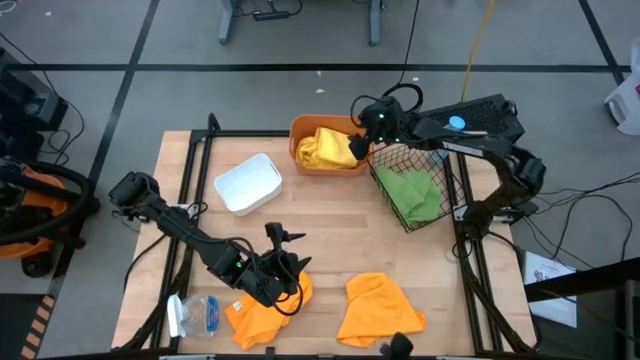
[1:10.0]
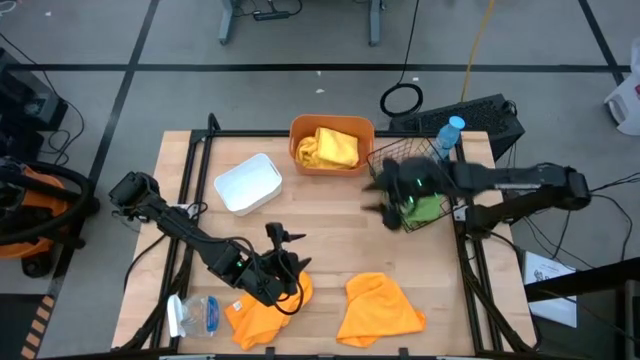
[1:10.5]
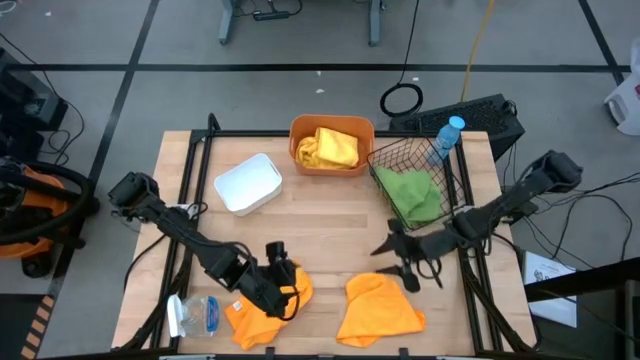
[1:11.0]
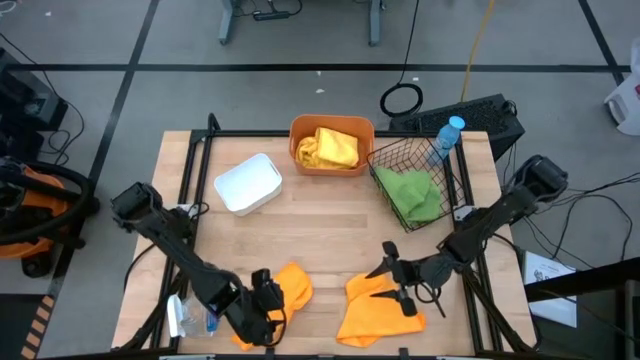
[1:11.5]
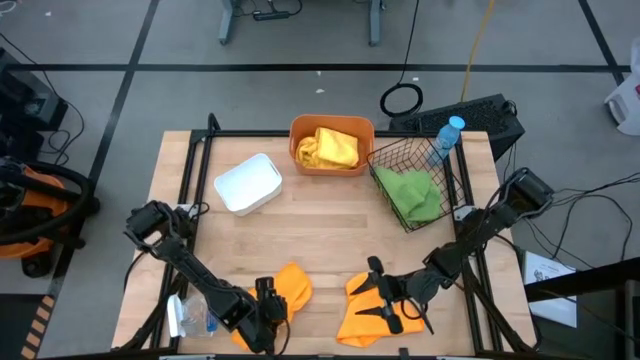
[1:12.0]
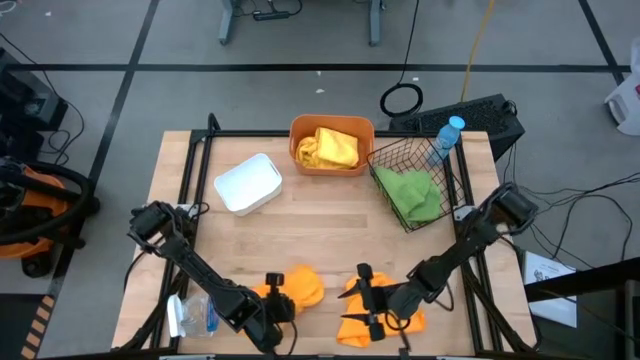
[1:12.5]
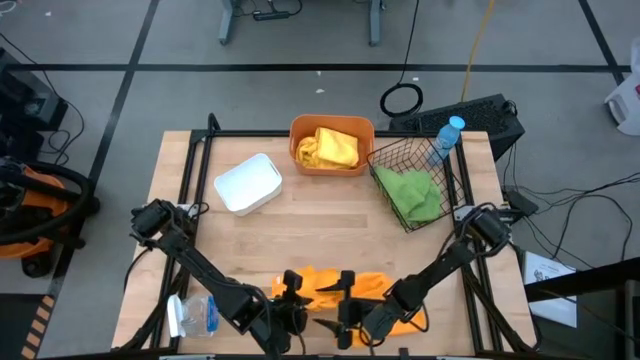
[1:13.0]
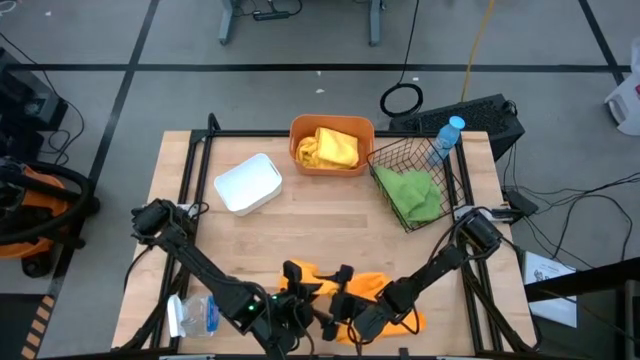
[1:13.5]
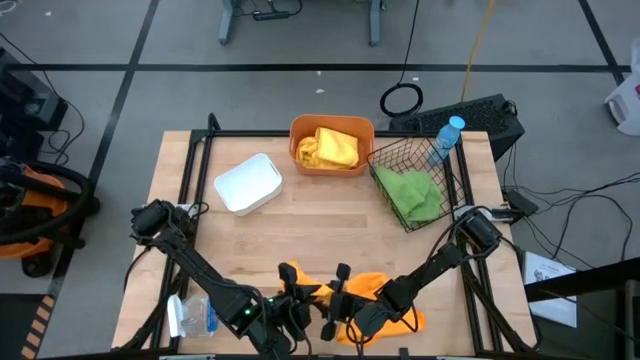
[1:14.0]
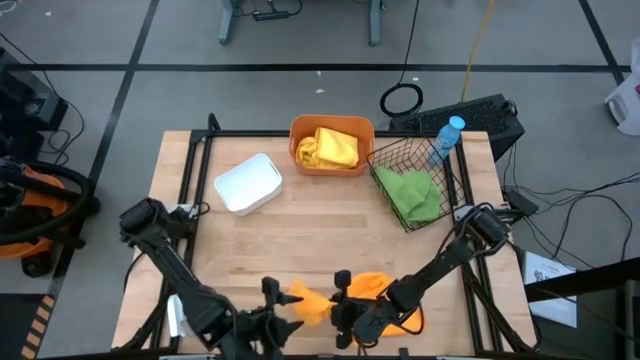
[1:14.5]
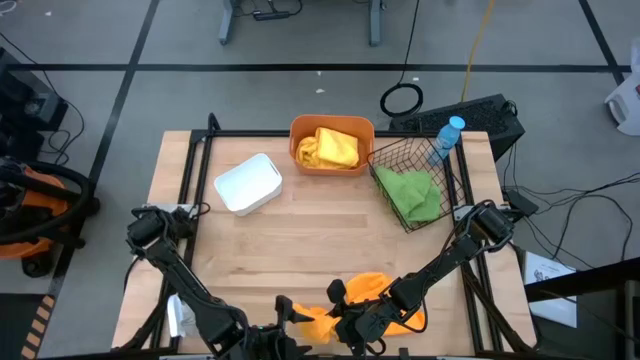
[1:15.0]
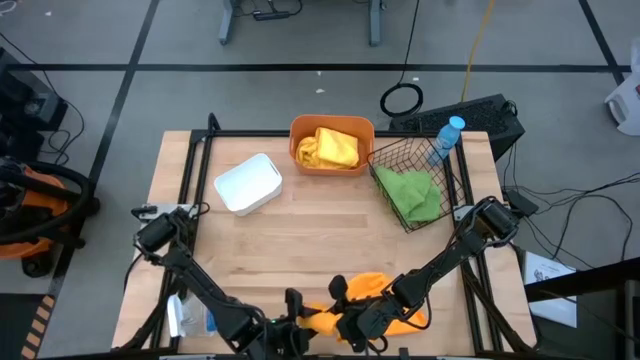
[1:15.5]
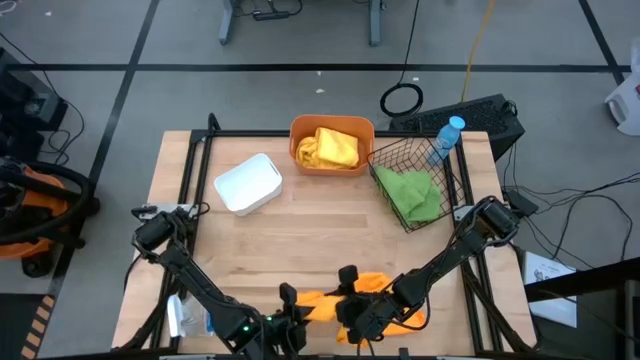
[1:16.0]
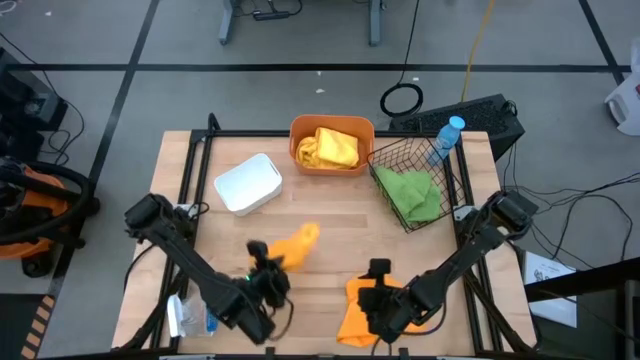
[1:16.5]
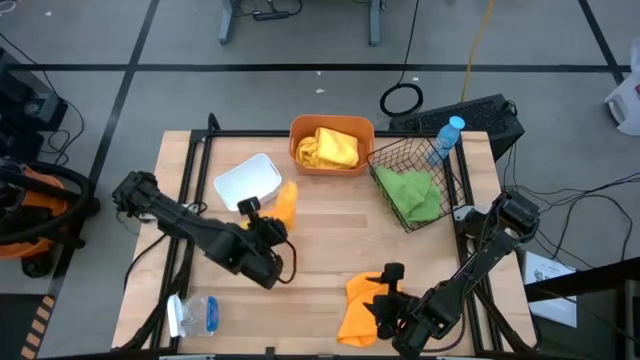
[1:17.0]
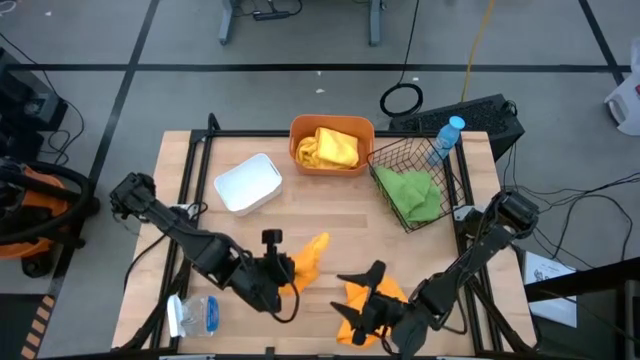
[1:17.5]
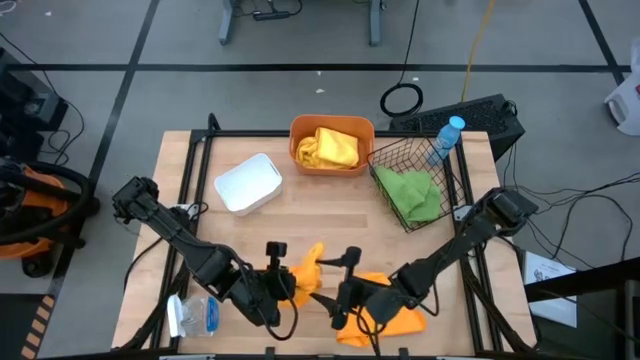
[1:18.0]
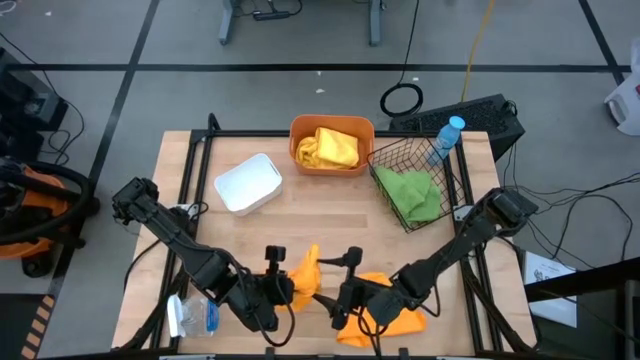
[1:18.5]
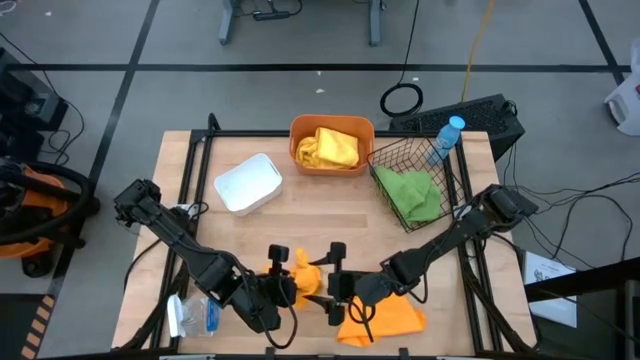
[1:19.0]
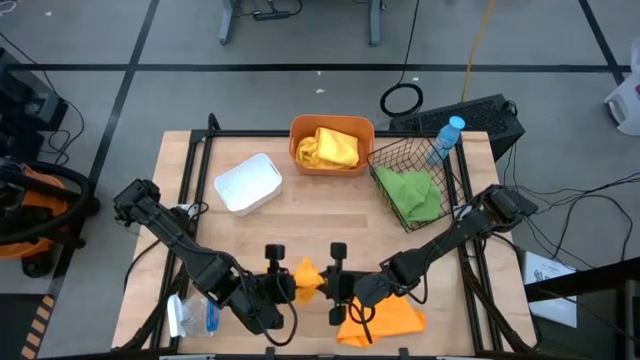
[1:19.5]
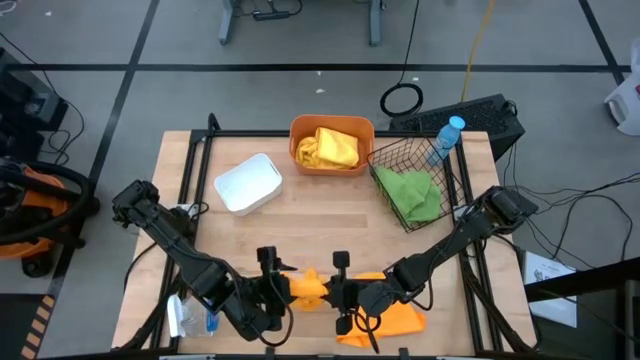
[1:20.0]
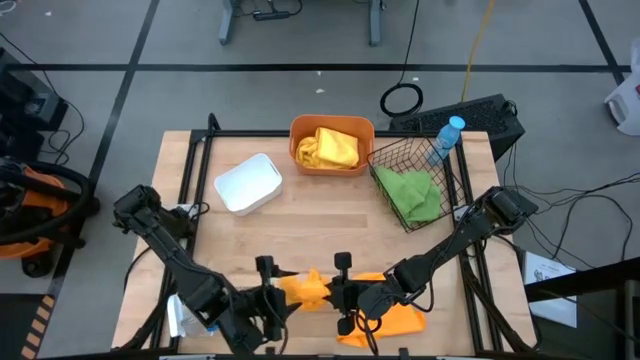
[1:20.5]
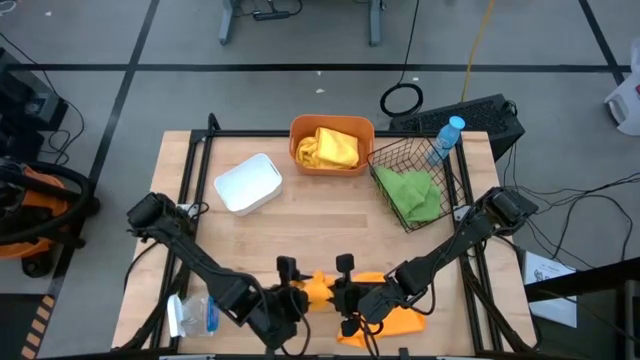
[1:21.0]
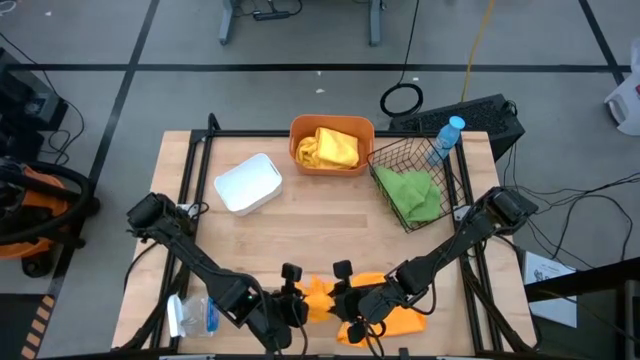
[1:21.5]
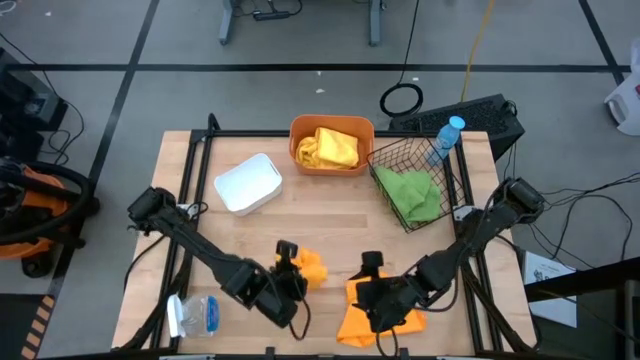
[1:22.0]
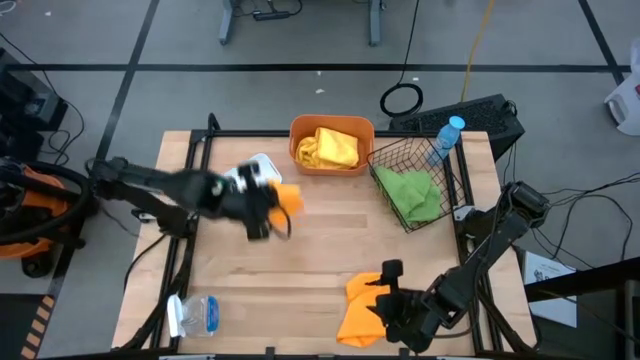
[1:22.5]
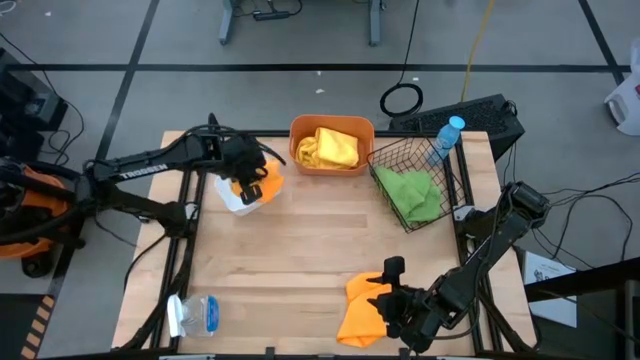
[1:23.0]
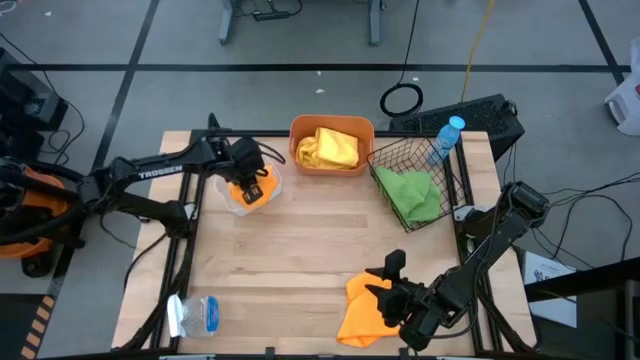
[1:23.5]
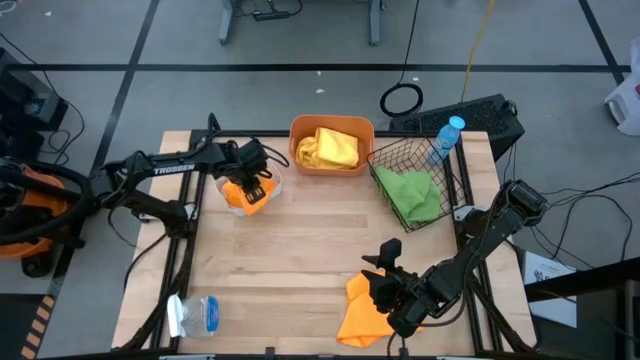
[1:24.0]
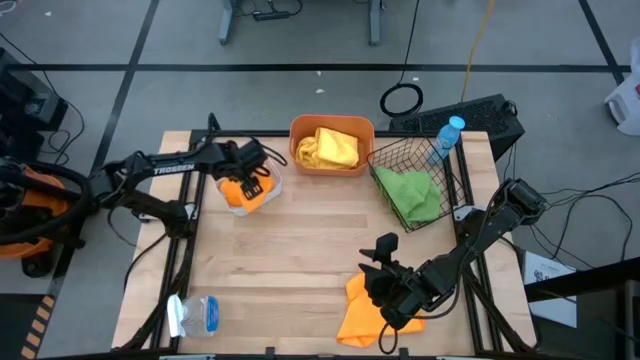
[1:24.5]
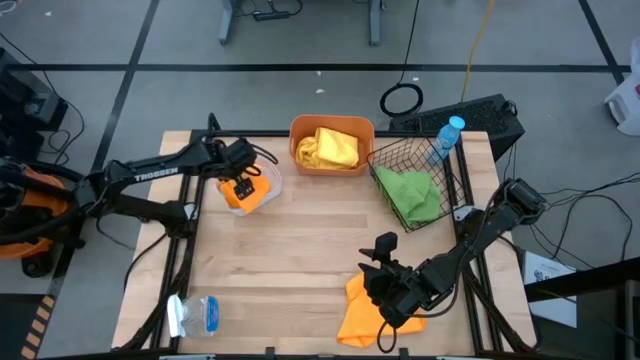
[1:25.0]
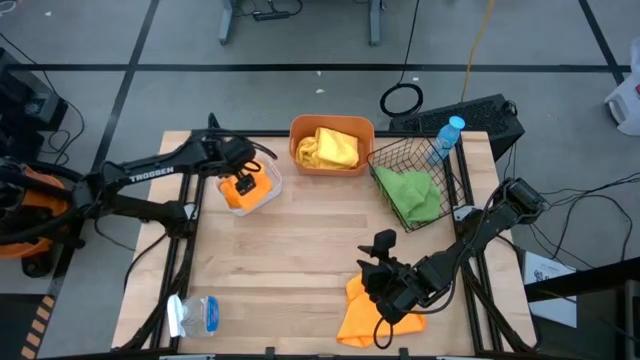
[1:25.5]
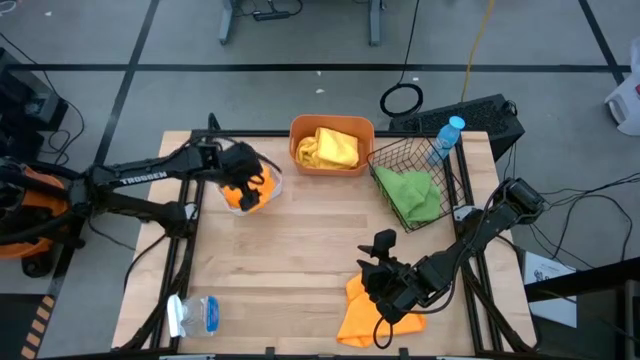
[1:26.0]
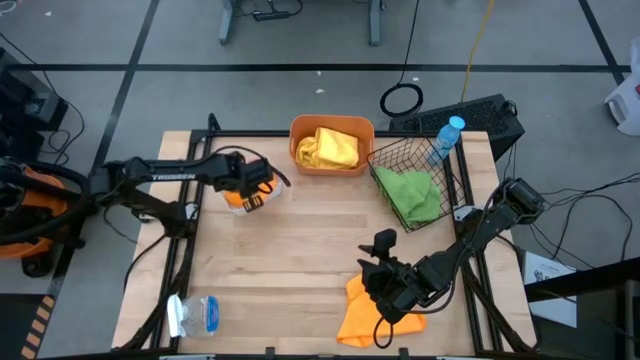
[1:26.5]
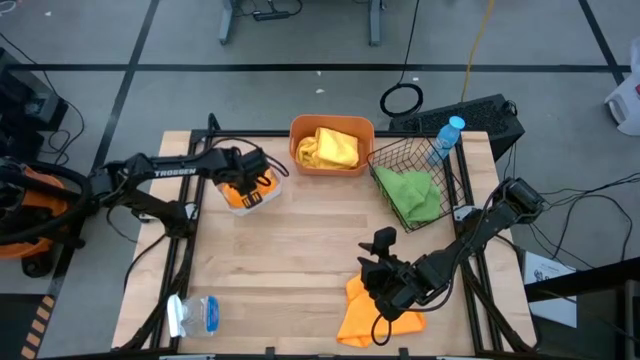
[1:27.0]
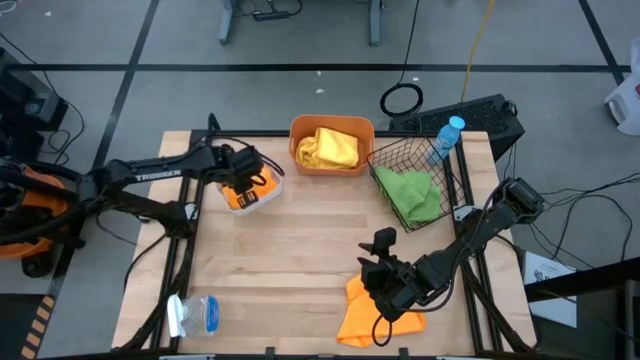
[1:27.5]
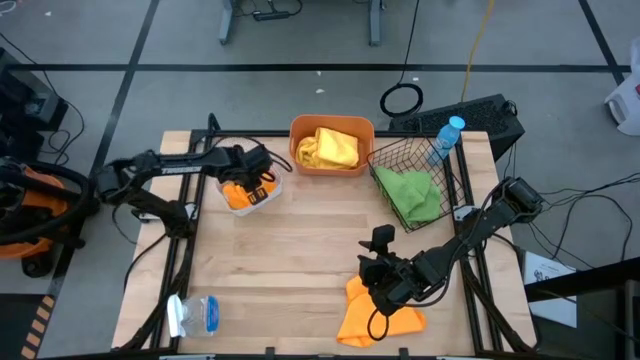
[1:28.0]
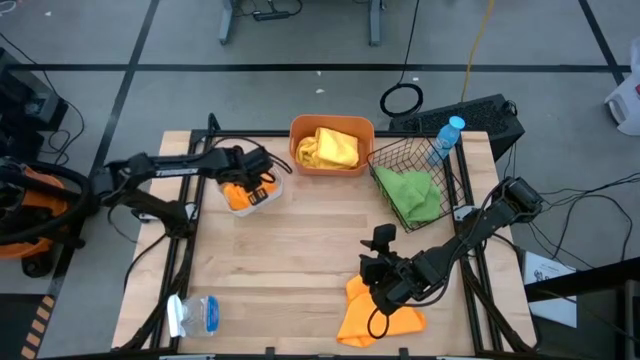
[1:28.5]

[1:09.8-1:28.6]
Task: Sort microfiber towel by color & place in baskets
Put the left orange towel into the white bin

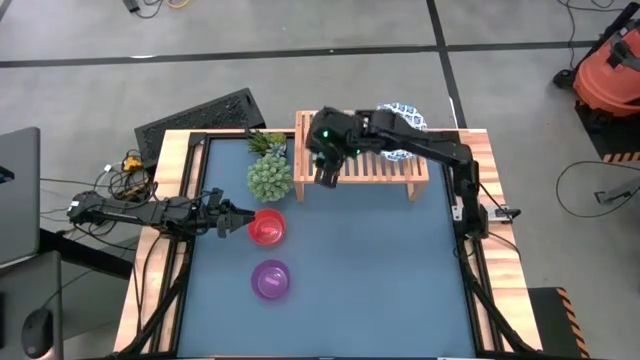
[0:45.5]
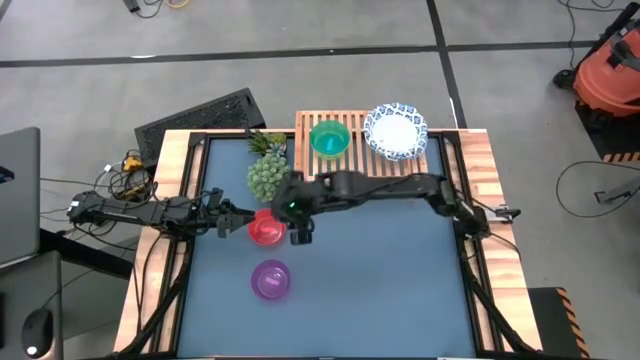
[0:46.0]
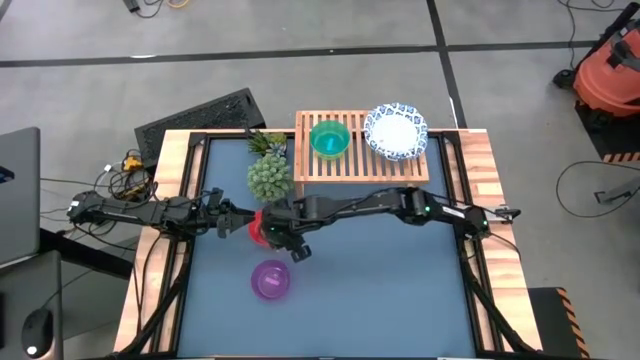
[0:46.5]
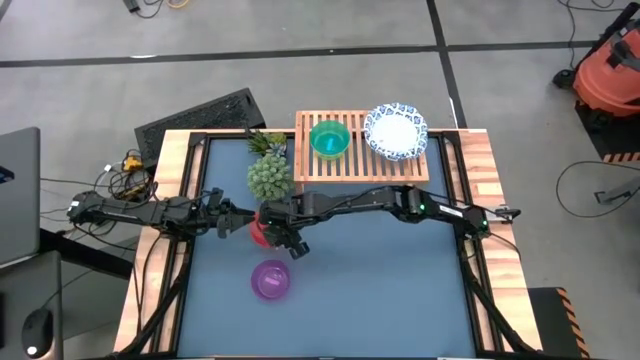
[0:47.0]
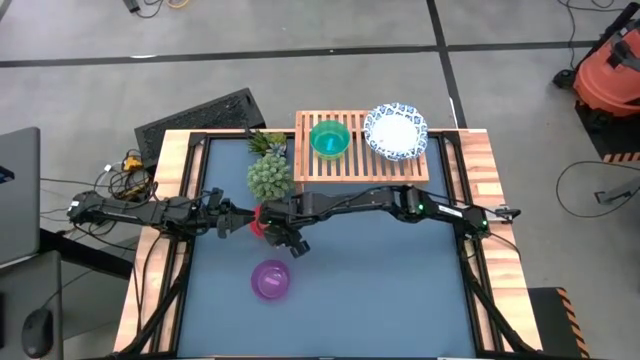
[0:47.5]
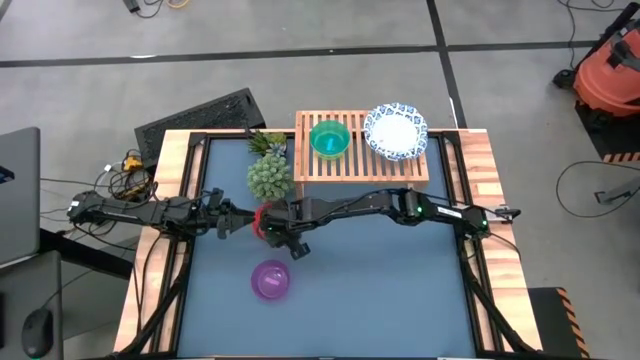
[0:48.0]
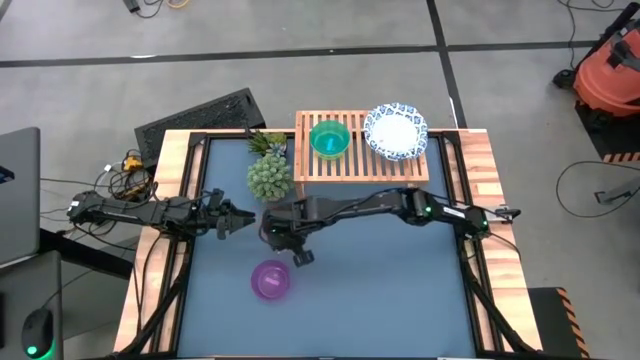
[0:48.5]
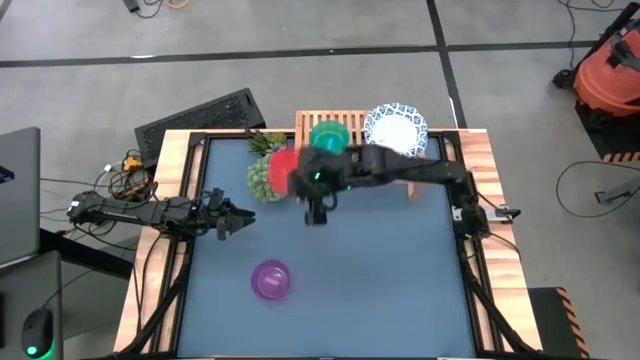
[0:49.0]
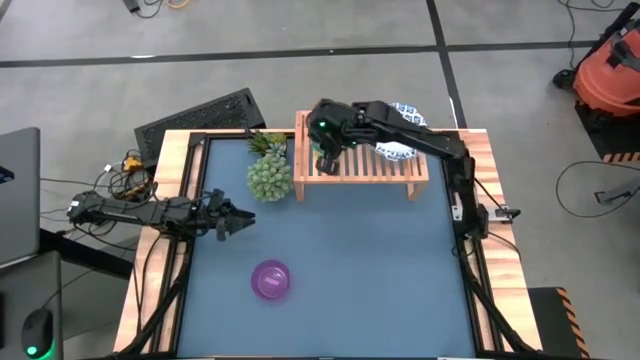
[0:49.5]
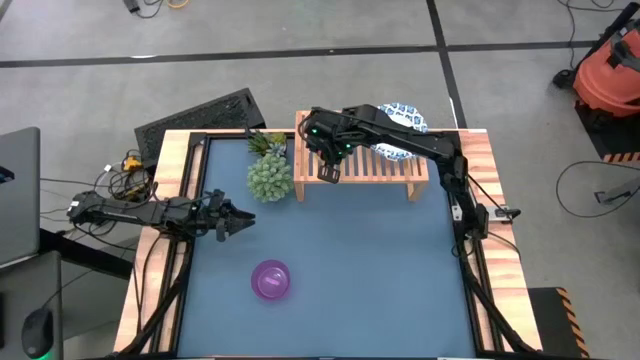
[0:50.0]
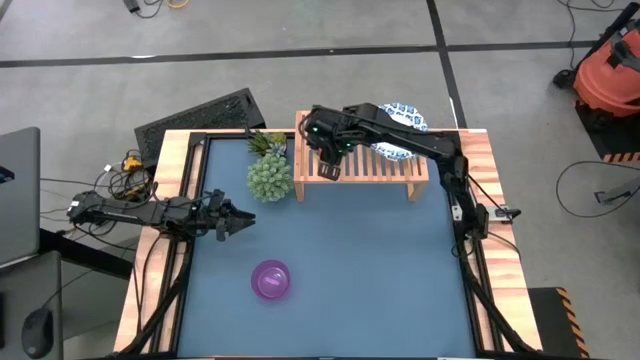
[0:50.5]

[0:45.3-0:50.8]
Task: Place and stack bowls onto a shelf
Stack the orange bowl on top of the blue bowl on the shelf
